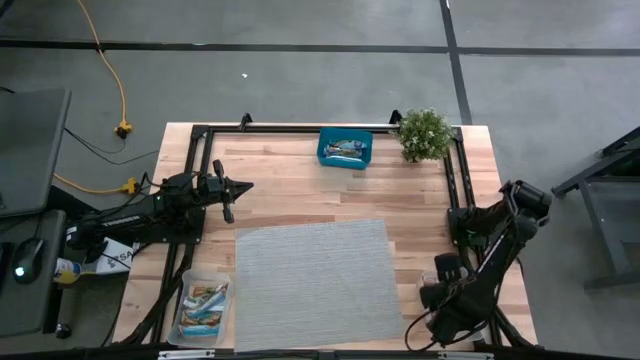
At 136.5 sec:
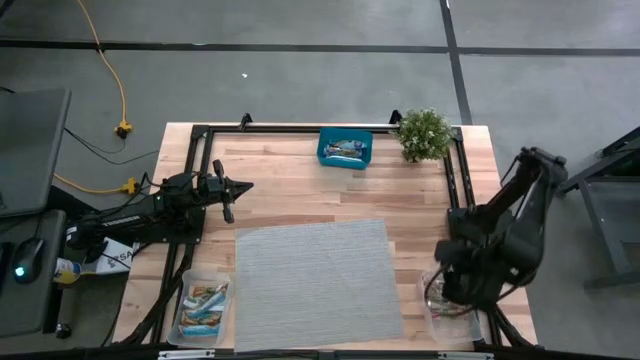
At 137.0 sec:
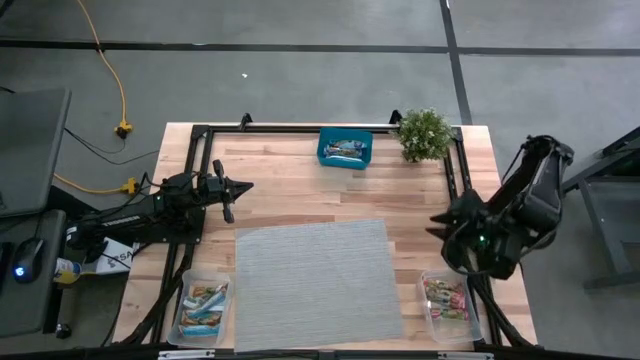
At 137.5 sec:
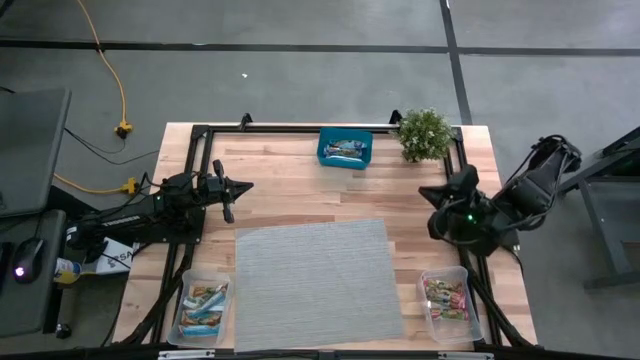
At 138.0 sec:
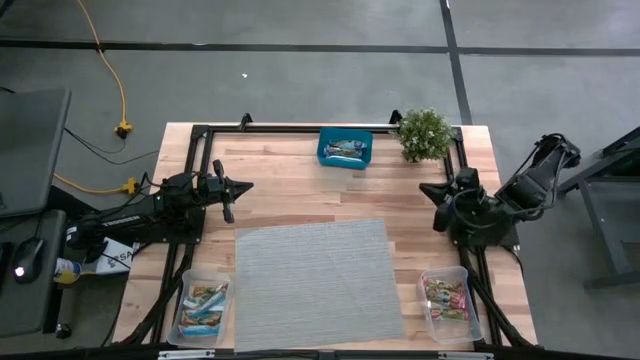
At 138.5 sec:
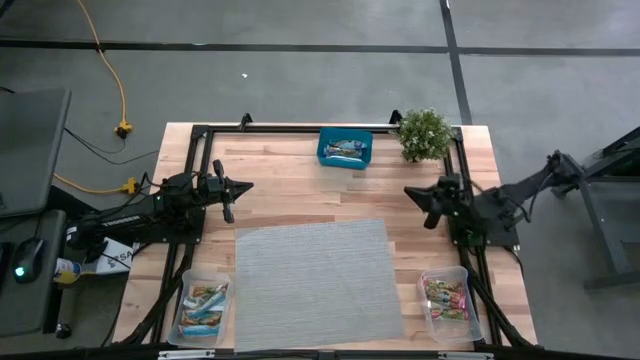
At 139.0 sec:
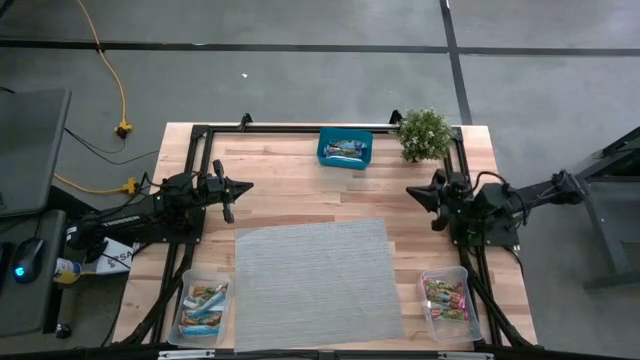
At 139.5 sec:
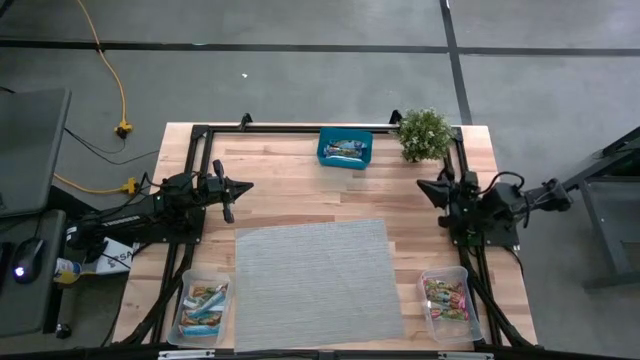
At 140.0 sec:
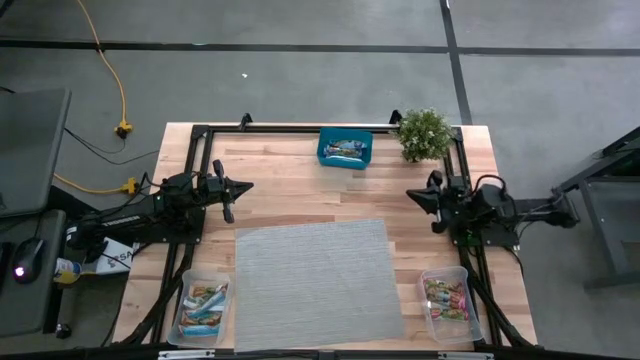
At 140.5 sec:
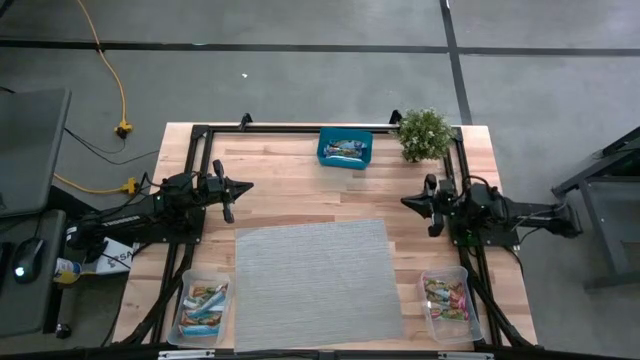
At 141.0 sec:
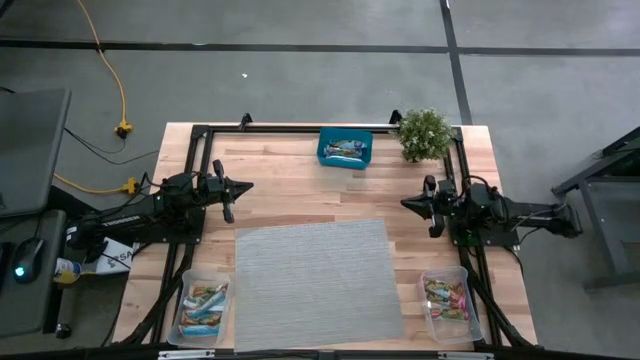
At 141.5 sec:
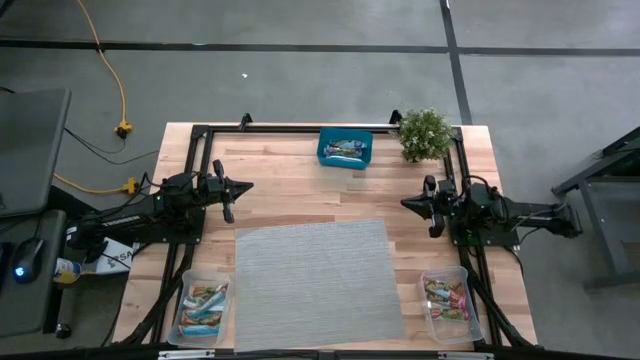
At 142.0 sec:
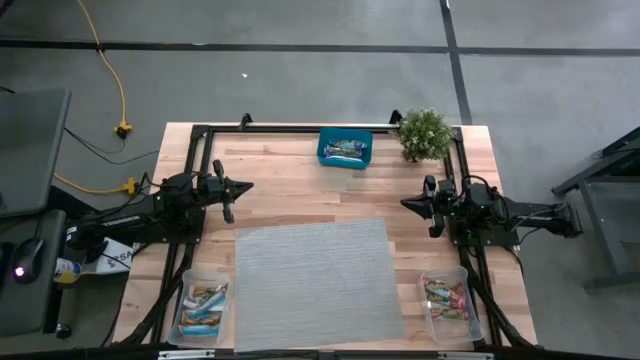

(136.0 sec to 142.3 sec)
Task: Pick and place Granola Bars by type
Return to Home Position

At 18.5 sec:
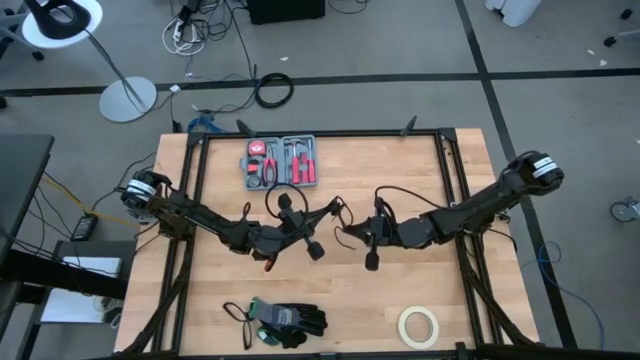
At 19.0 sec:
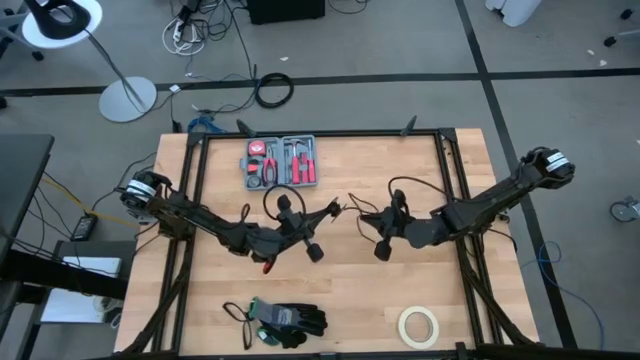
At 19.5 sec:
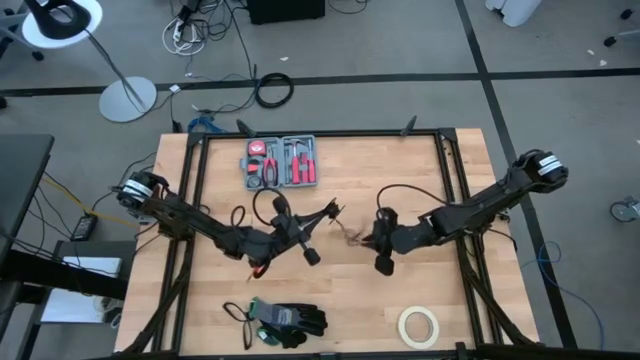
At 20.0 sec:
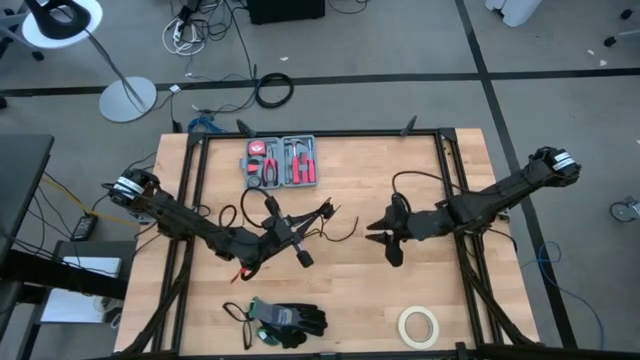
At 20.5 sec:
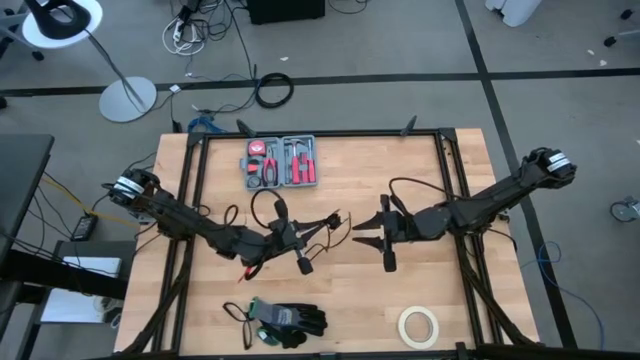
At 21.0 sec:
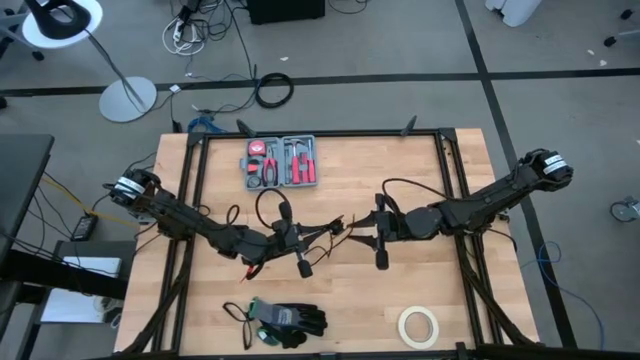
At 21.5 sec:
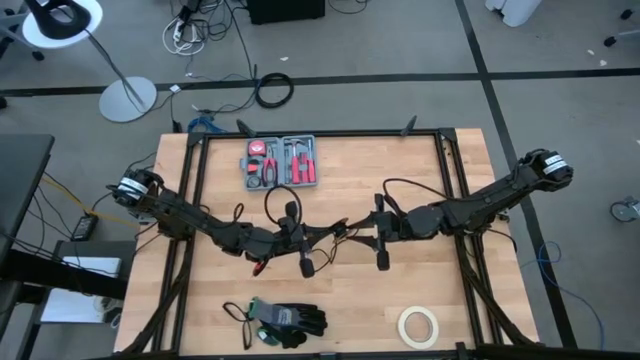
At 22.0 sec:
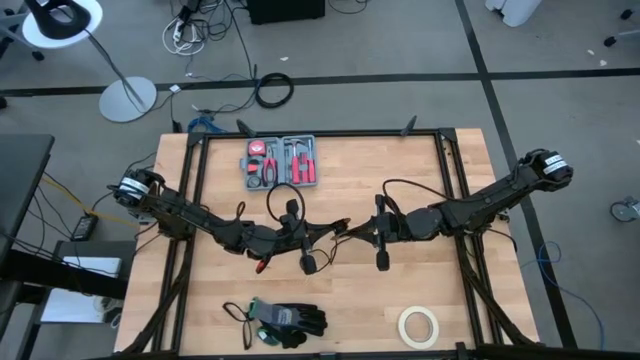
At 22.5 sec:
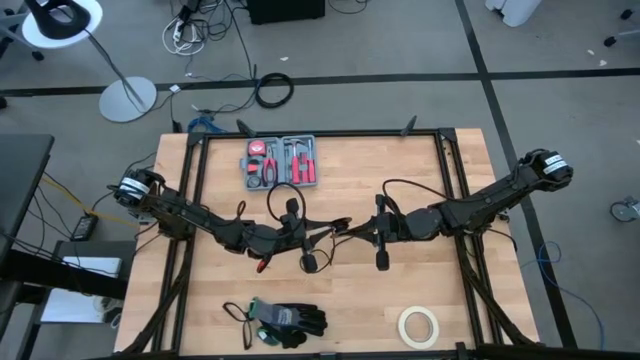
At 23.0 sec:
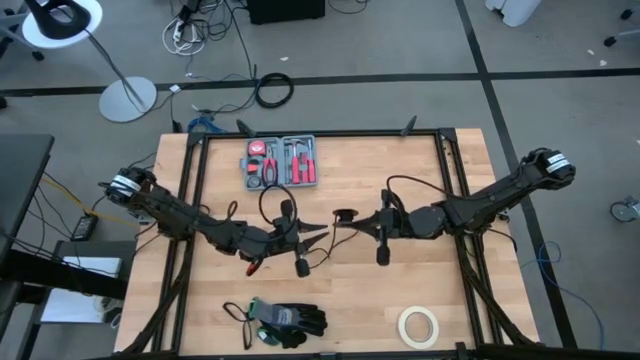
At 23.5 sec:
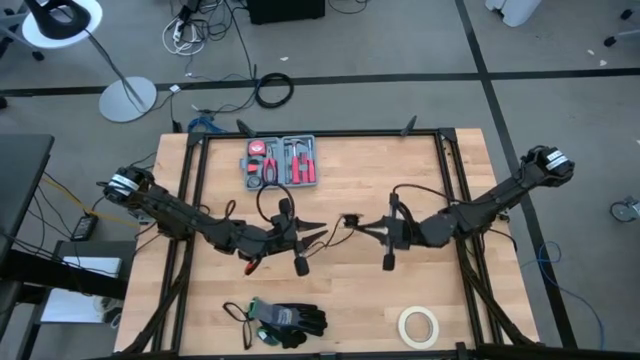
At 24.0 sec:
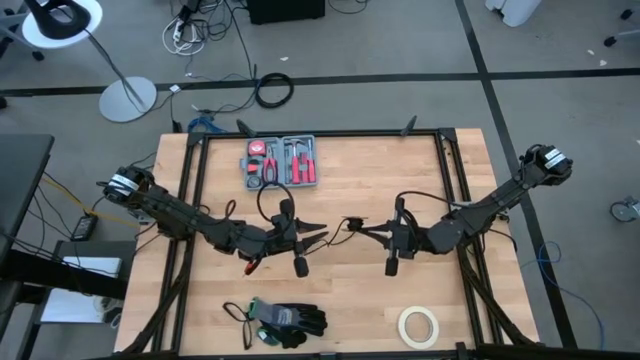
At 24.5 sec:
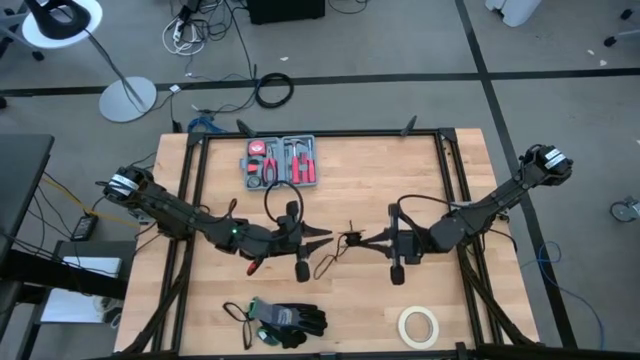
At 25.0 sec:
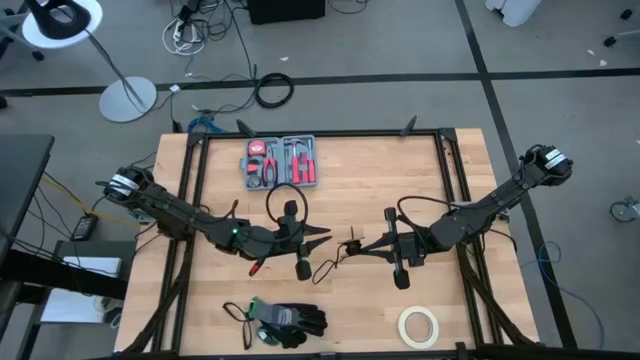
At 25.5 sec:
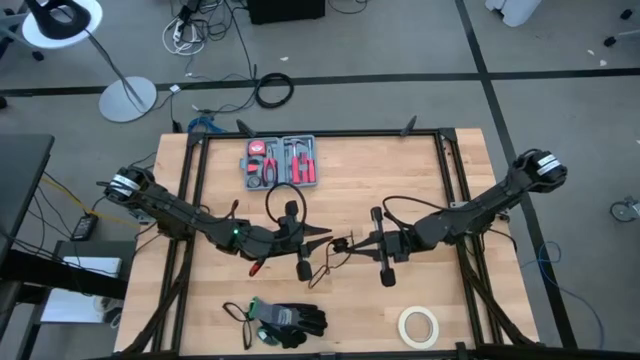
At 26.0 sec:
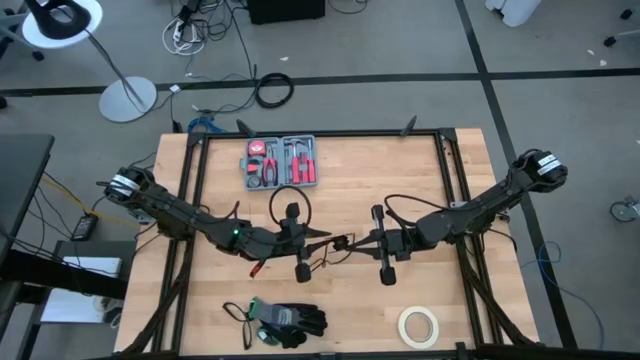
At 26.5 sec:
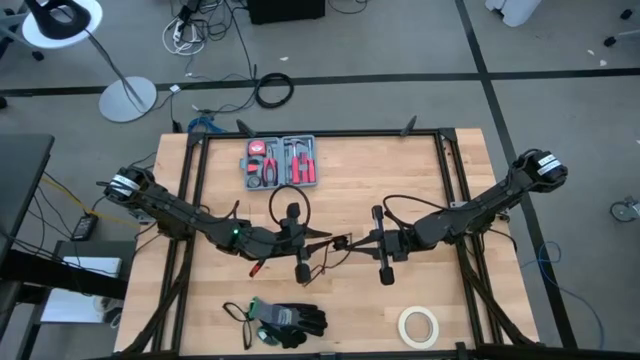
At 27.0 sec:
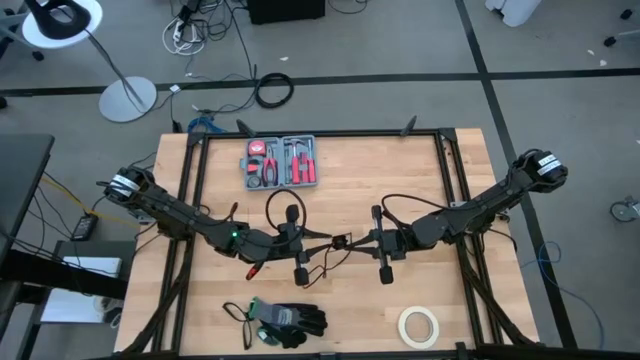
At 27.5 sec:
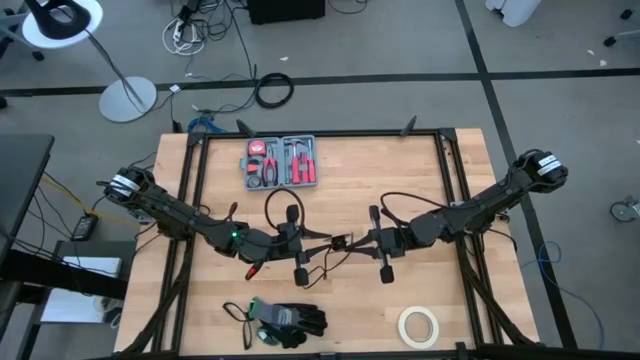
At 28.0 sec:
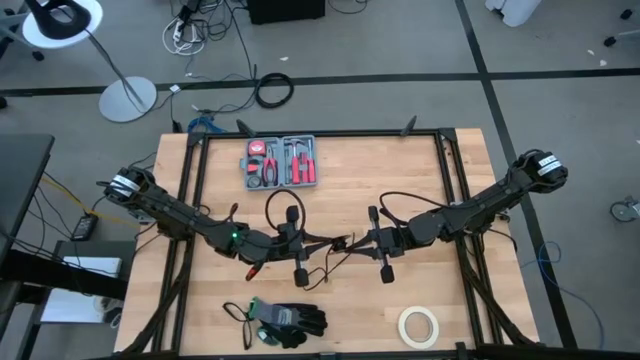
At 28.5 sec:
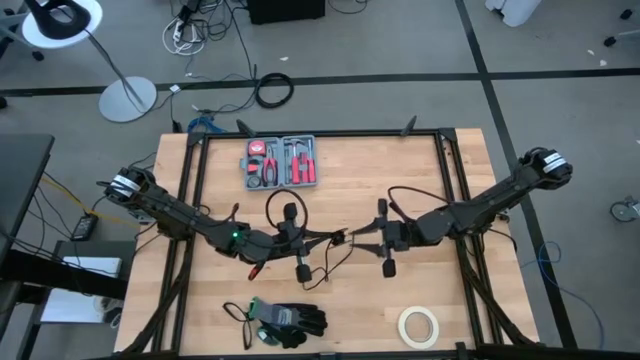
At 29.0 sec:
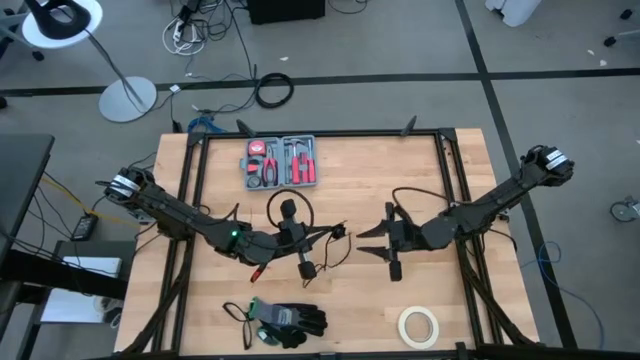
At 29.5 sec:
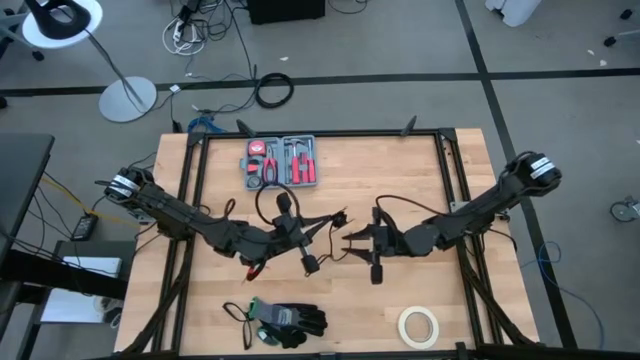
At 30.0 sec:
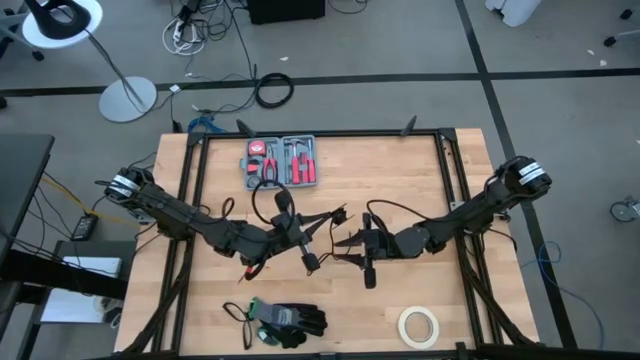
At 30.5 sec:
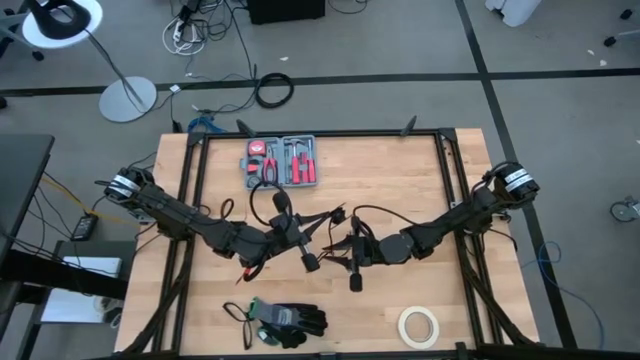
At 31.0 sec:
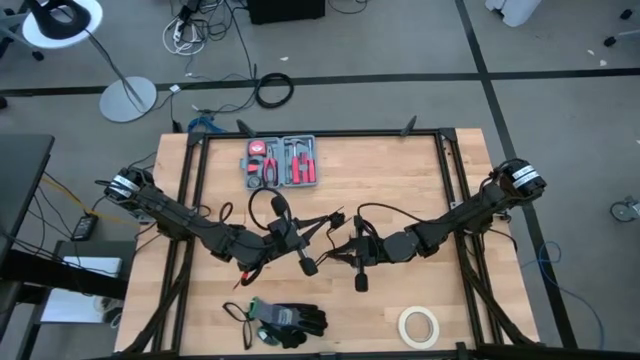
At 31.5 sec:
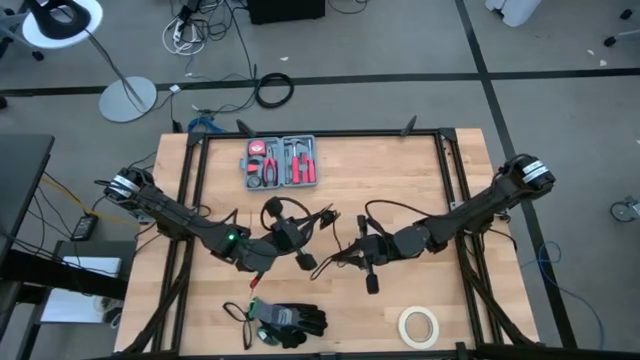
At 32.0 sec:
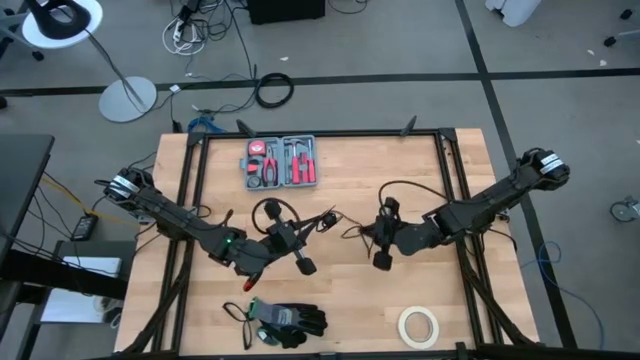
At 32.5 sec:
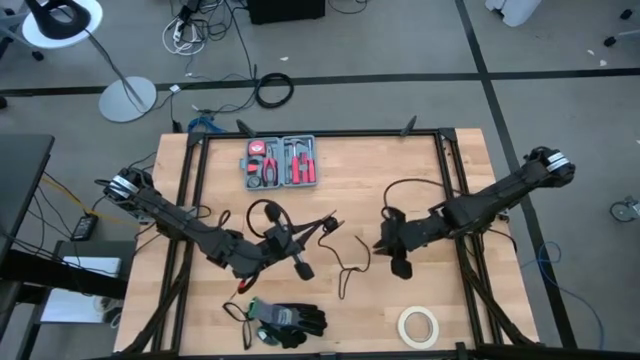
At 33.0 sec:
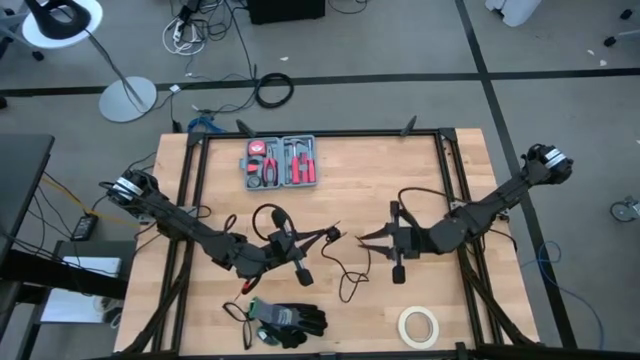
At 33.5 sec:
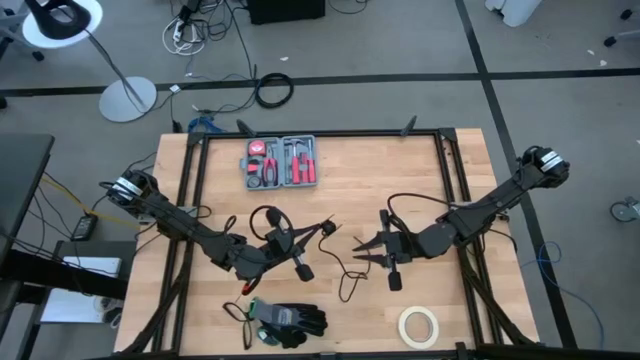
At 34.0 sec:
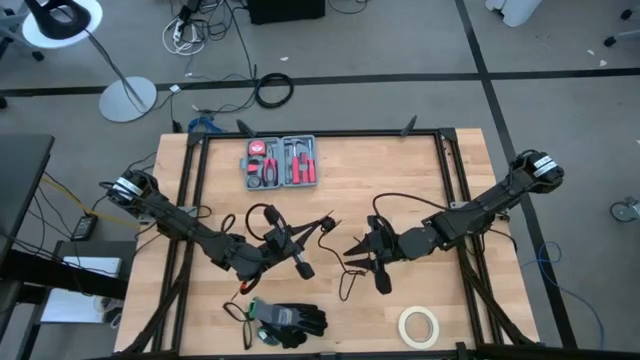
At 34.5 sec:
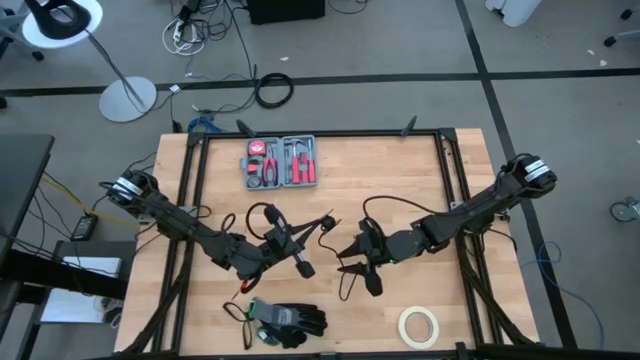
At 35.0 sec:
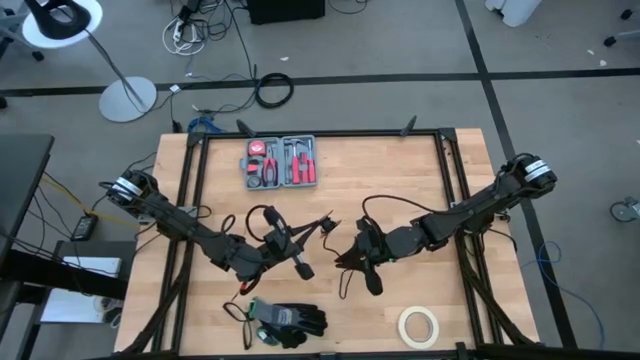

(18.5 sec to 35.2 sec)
Task: Coil cords
Uncoil the black wire cable from the black spool
